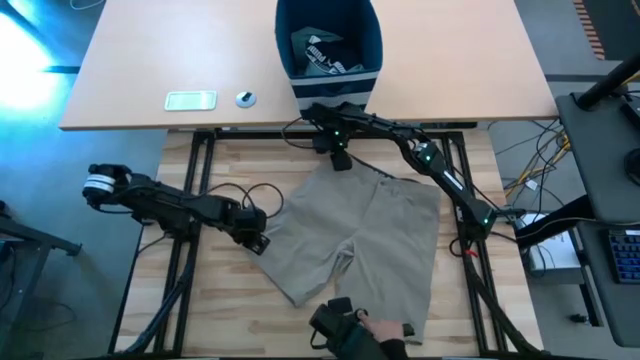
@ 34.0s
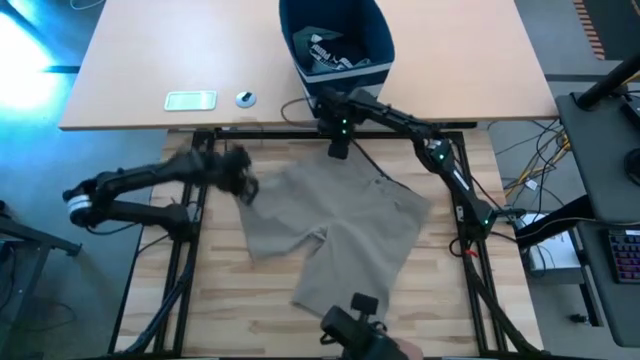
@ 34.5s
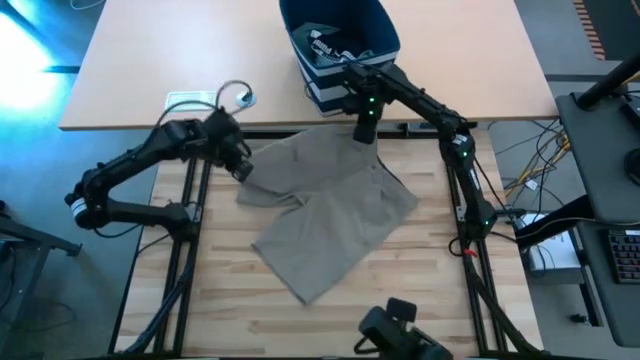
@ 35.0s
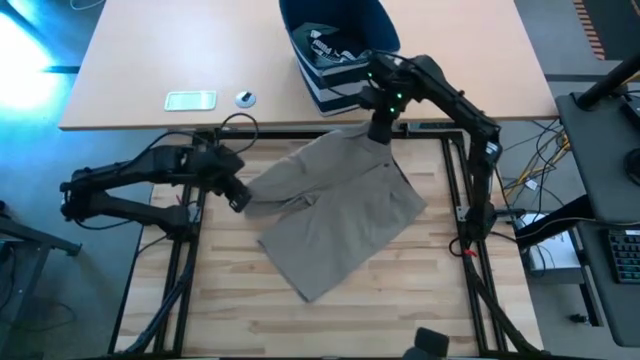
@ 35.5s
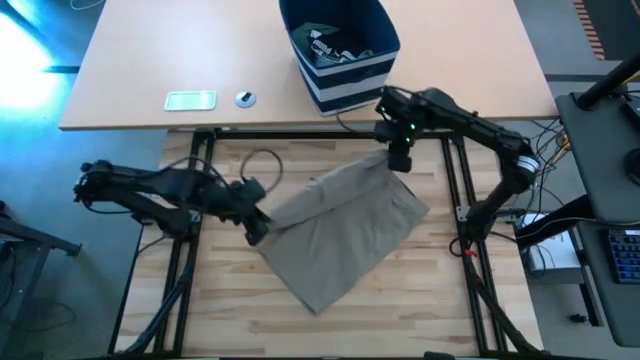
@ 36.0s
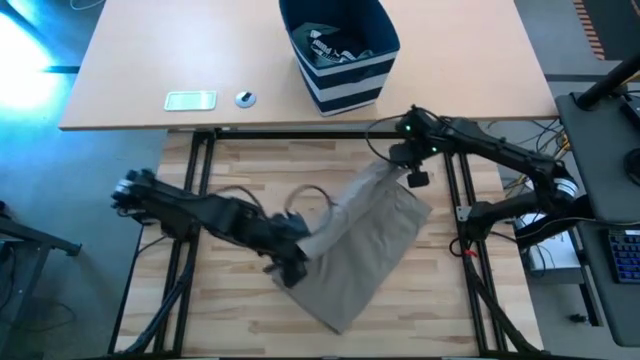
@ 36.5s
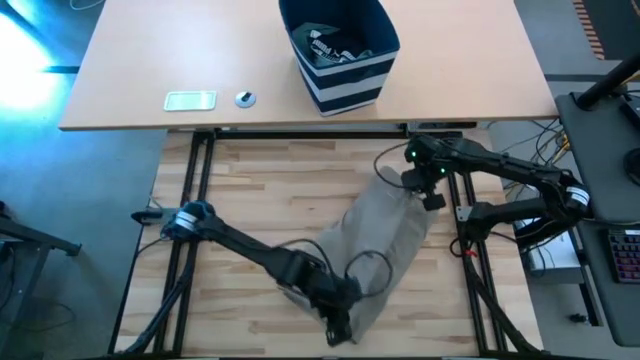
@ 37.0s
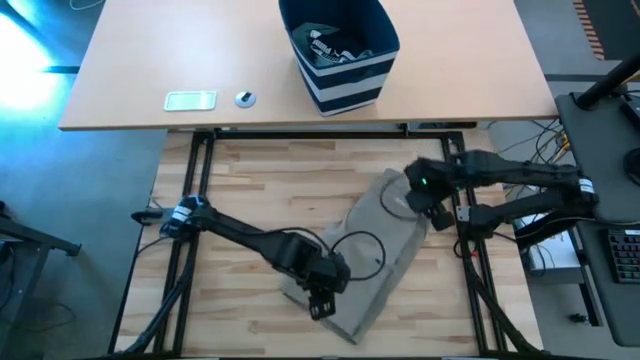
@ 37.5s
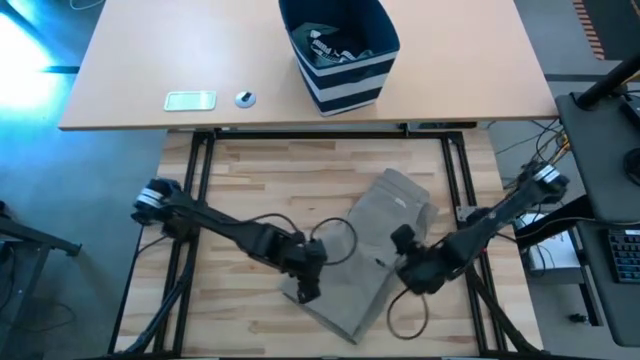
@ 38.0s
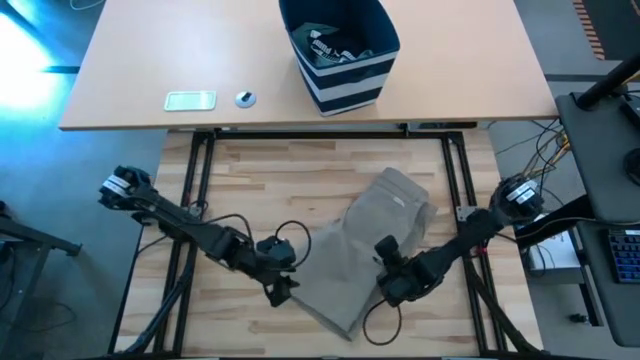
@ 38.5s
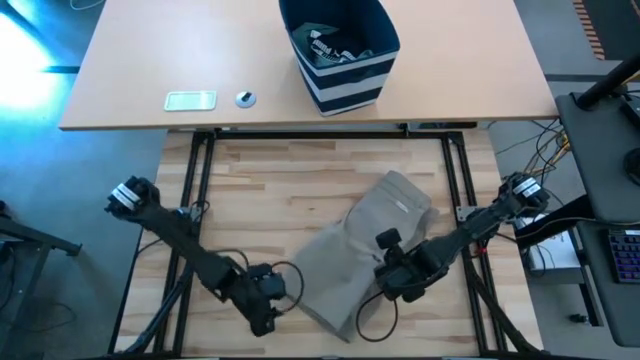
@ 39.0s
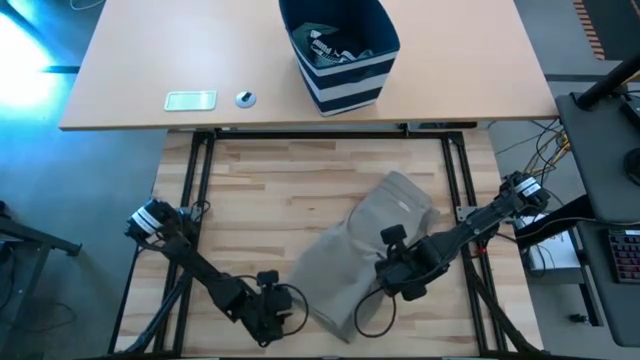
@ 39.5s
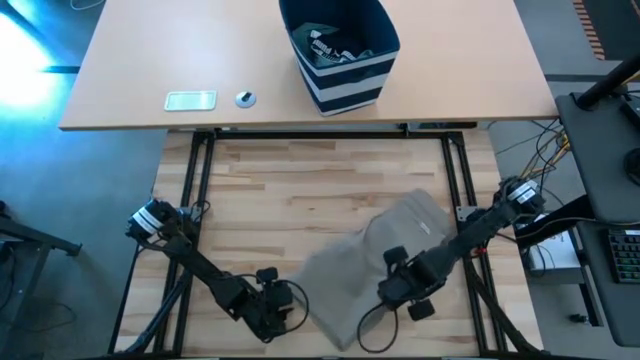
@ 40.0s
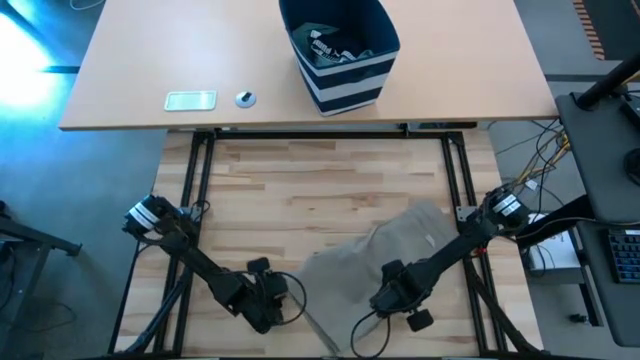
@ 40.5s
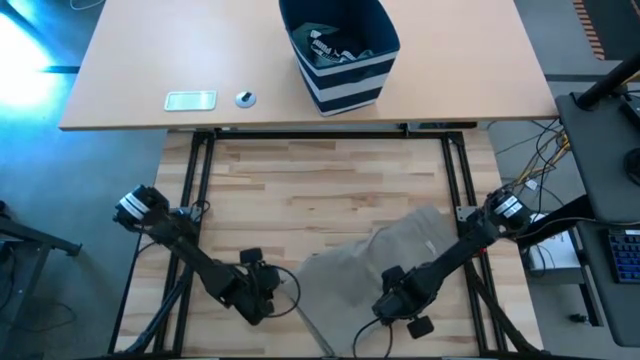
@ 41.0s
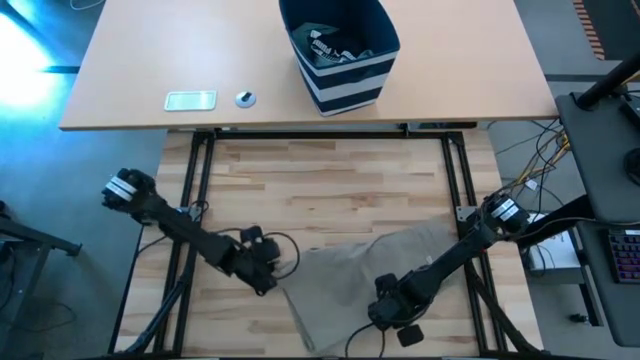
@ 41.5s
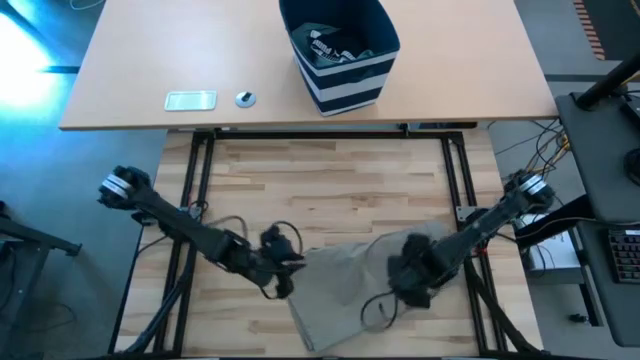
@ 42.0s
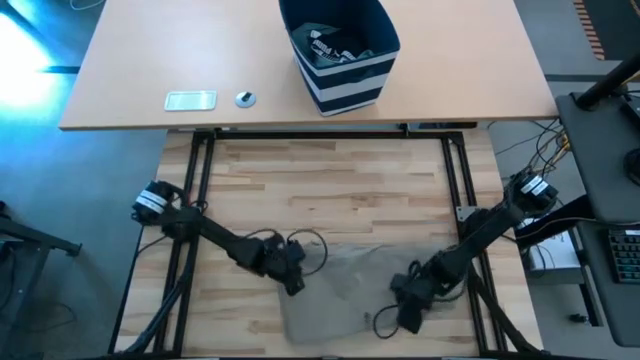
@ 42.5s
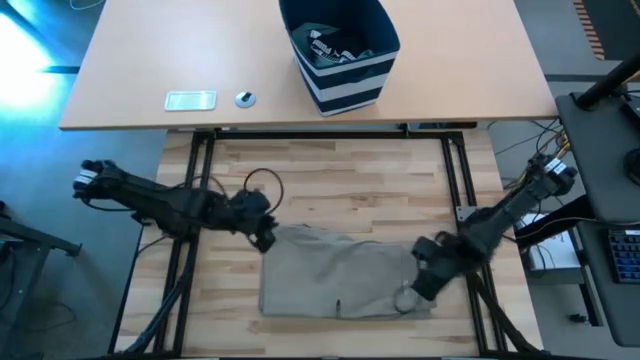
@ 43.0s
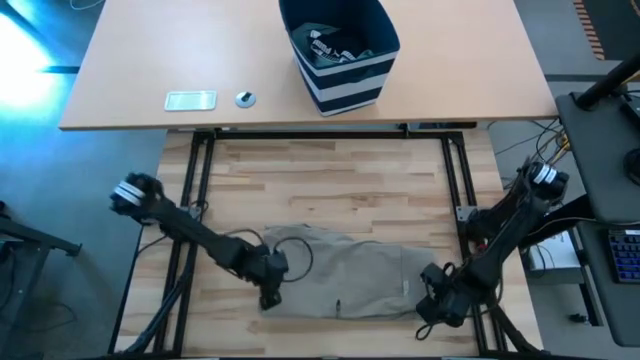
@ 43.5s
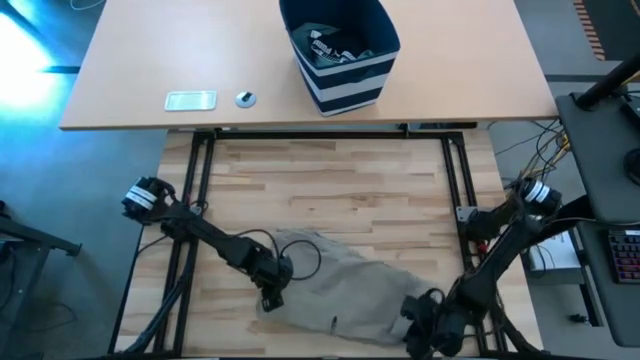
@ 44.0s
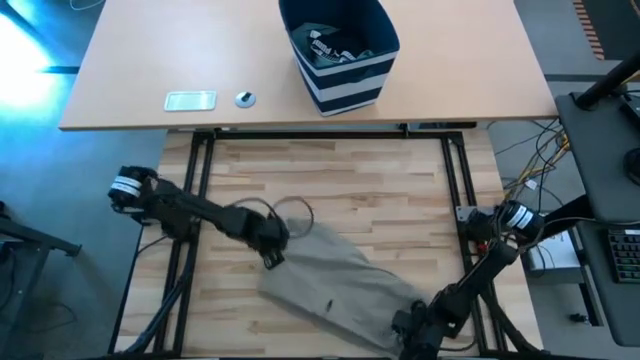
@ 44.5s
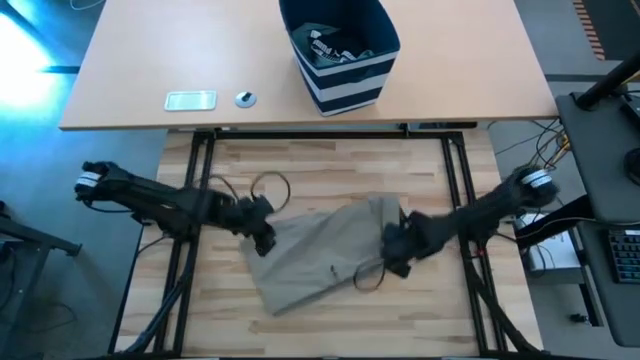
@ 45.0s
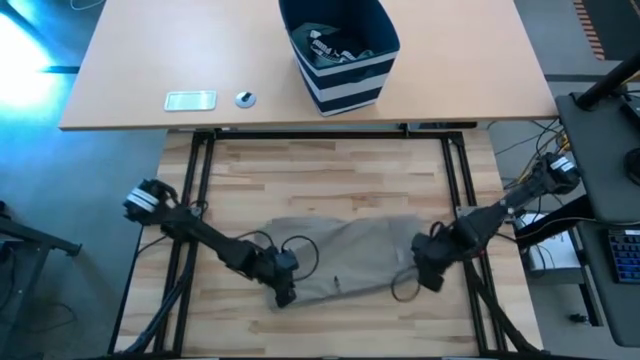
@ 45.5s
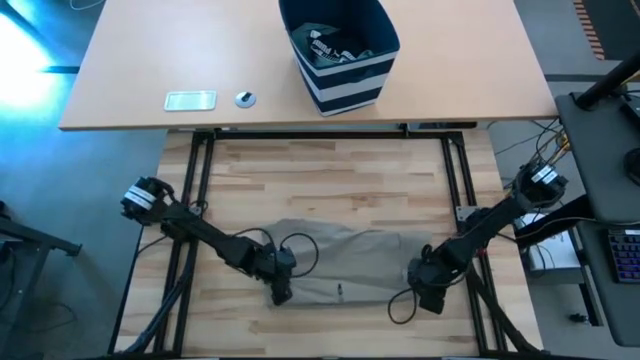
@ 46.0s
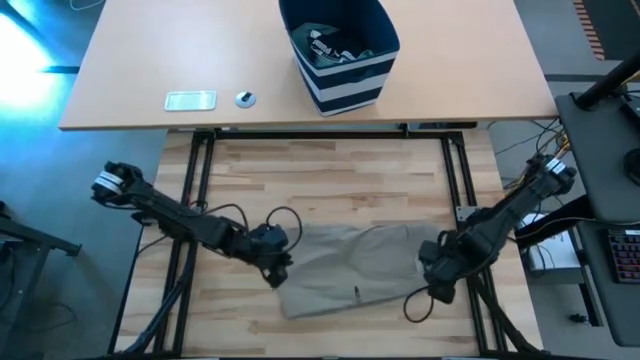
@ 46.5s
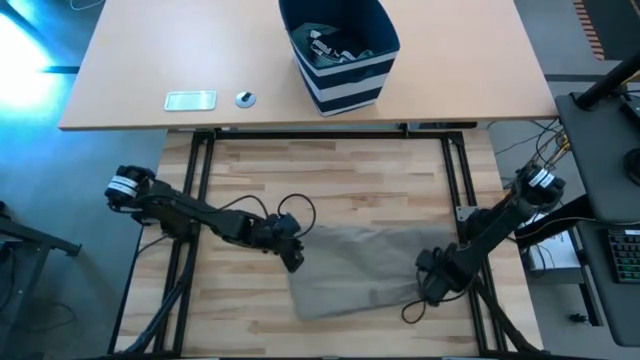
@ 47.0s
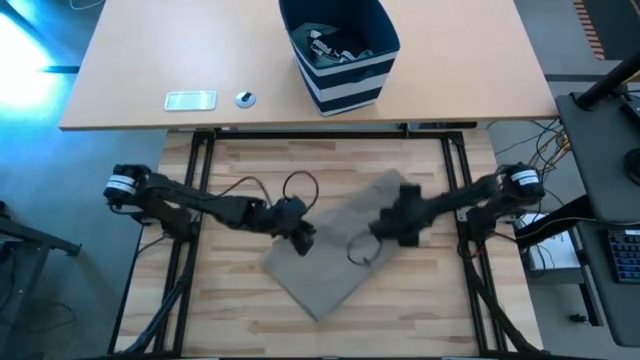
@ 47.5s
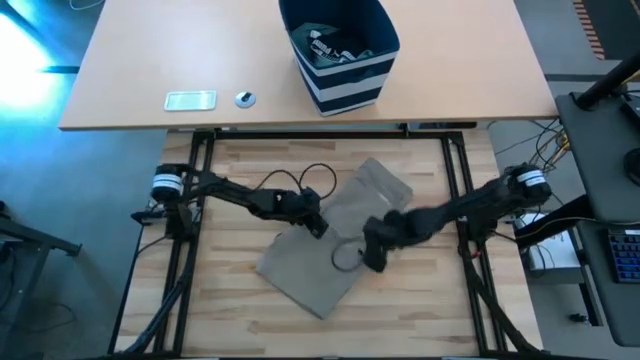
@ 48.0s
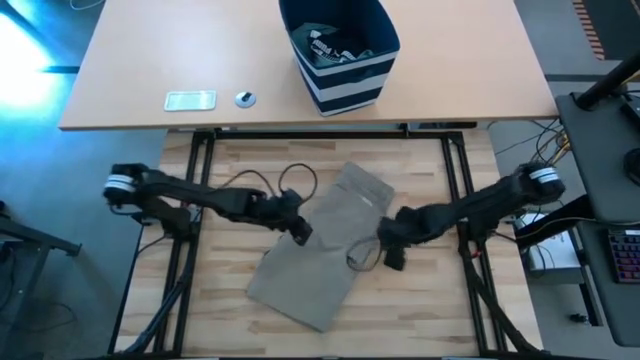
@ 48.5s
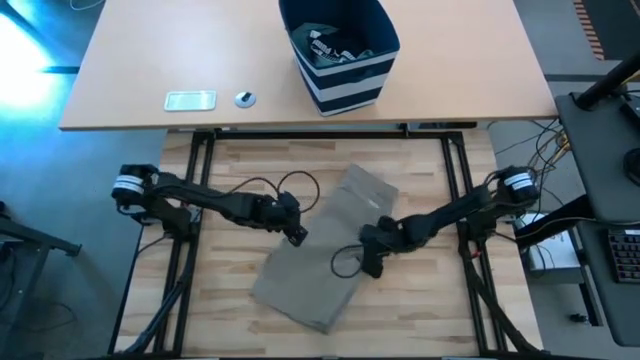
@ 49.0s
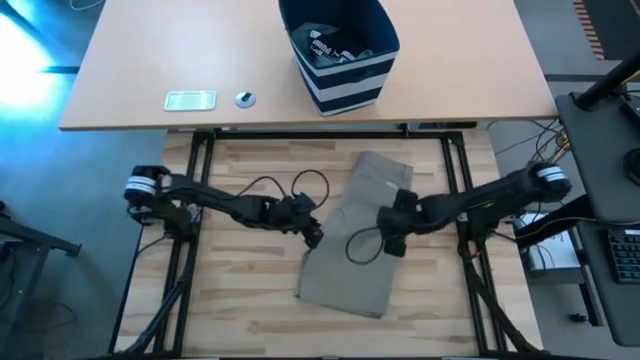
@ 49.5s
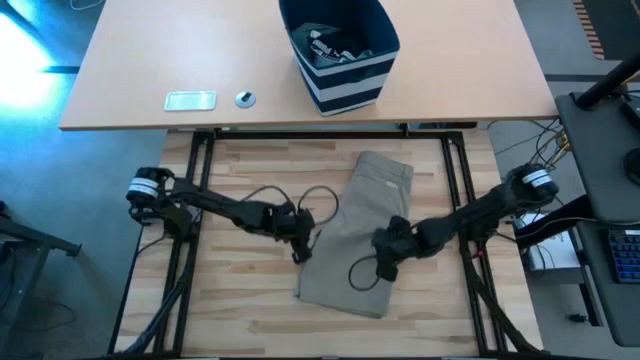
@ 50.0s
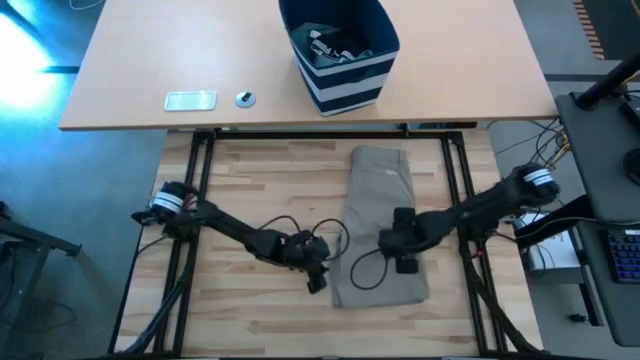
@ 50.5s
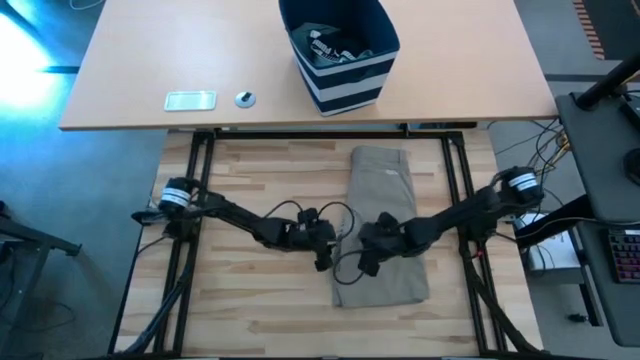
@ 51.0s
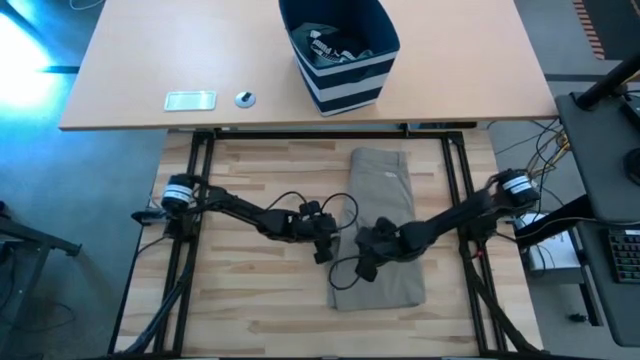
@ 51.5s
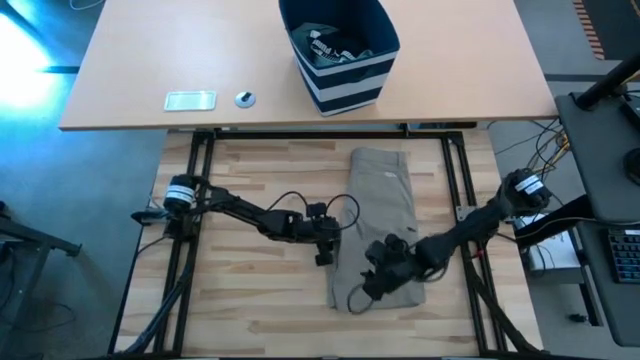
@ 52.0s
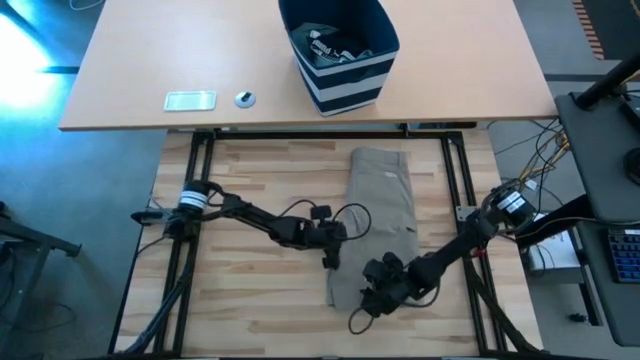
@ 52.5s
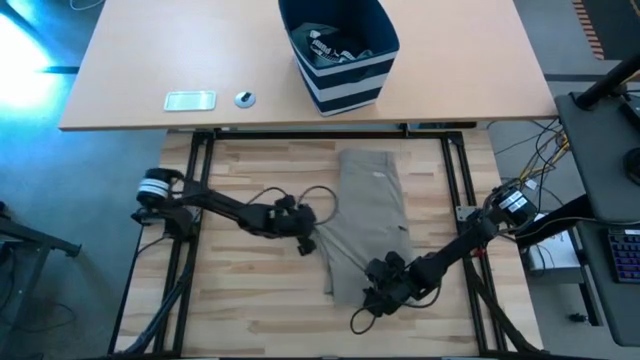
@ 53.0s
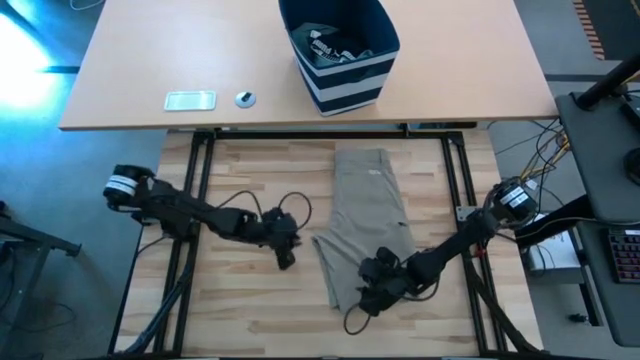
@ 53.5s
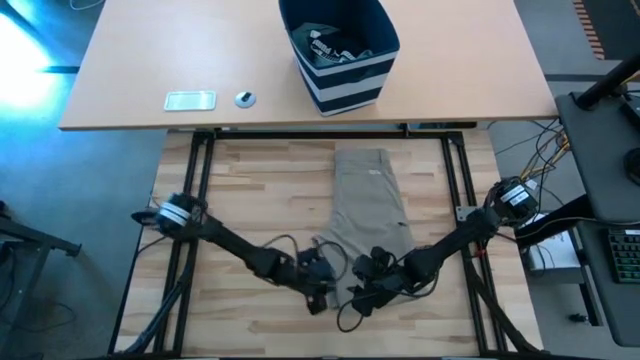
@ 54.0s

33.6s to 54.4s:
Task: Fold Laundry from Bin
Fold the brown shorts

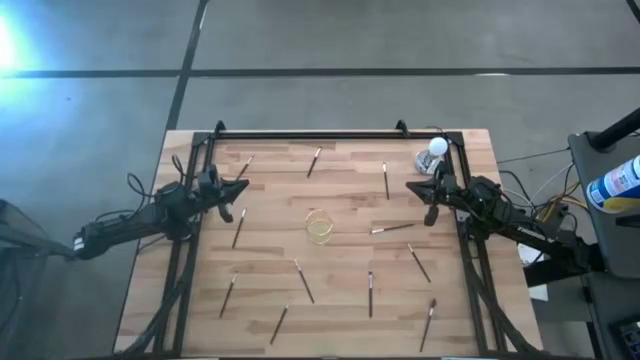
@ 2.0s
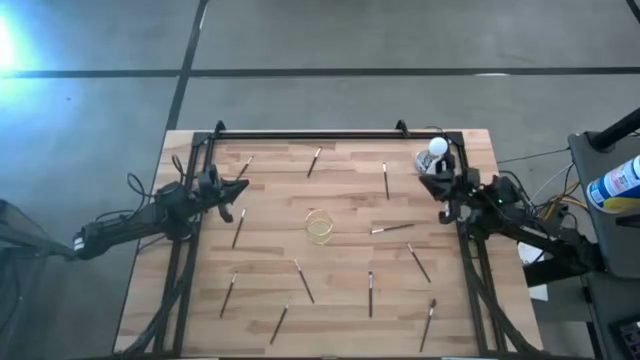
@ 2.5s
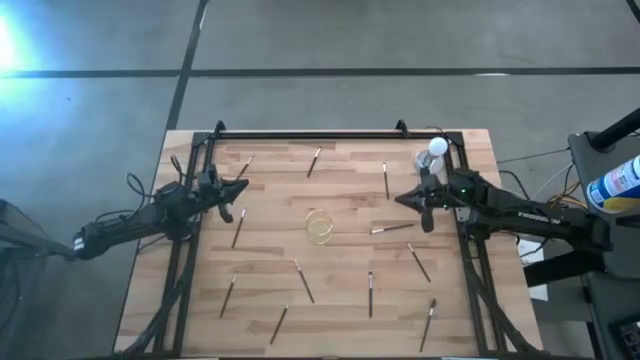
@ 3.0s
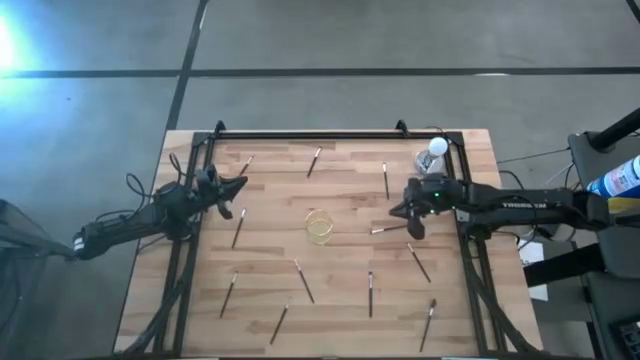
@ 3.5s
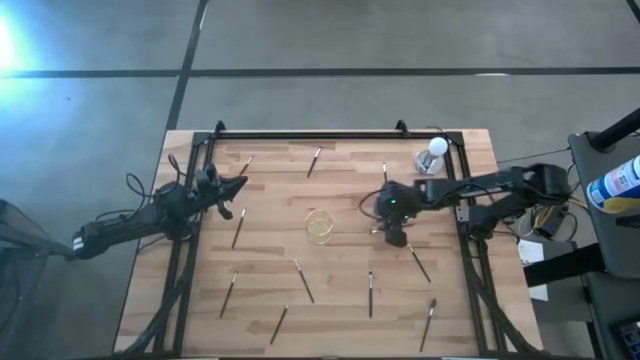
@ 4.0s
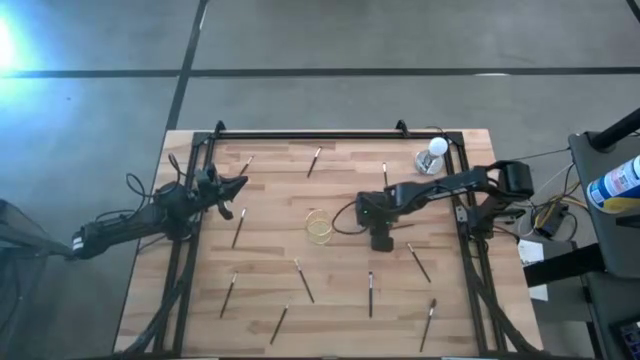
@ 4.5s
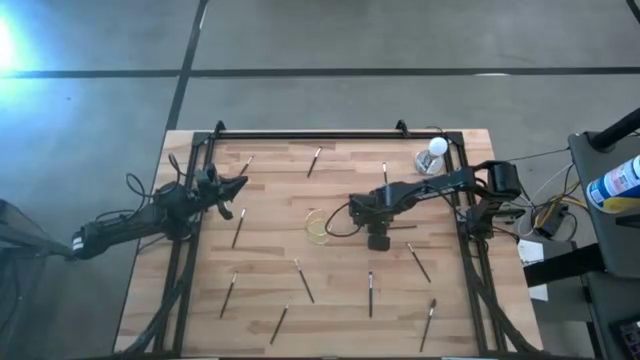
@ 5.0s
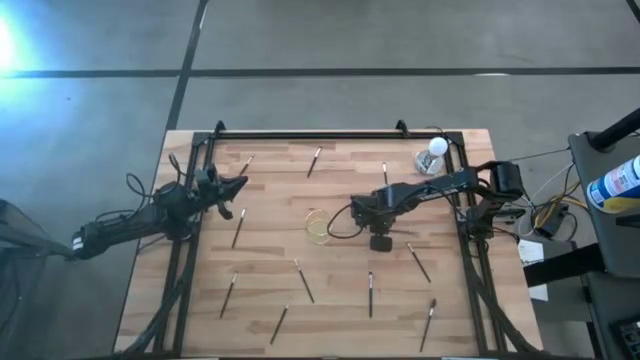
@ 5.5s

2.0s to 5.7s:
Task: Pick & Place Makeup Brushes
Put the eyeshadow brush into the gold makeup brush holder
